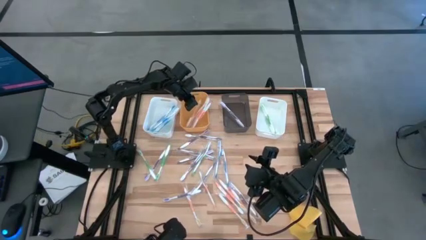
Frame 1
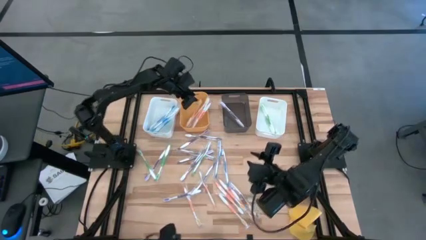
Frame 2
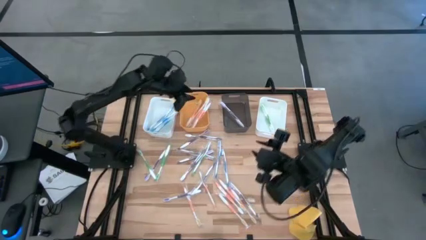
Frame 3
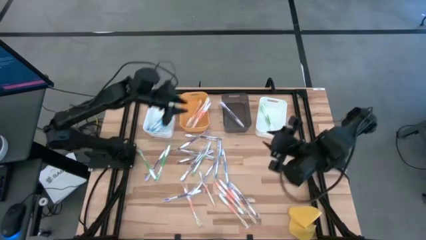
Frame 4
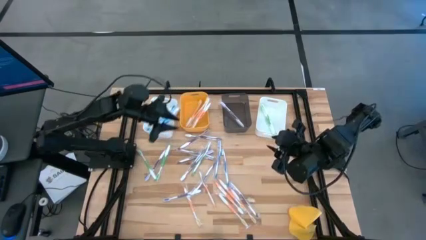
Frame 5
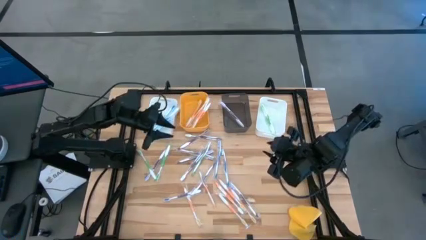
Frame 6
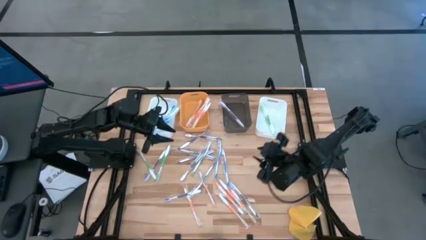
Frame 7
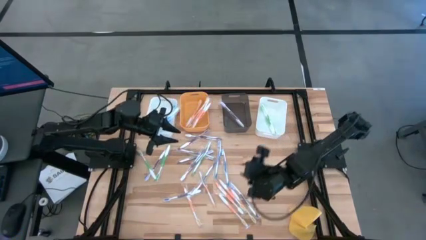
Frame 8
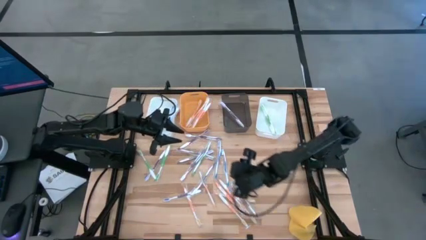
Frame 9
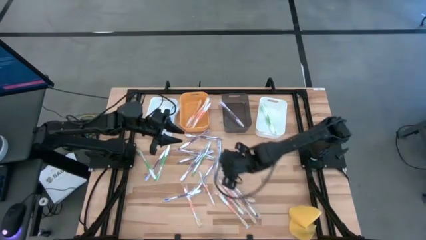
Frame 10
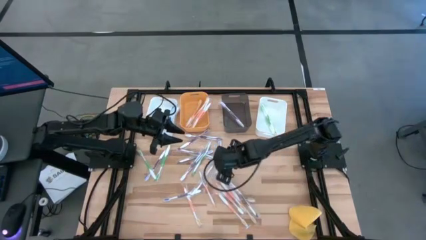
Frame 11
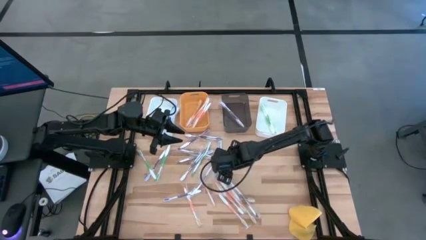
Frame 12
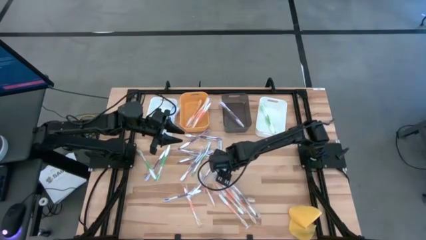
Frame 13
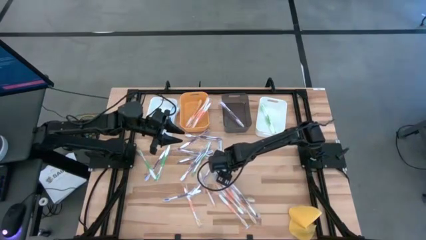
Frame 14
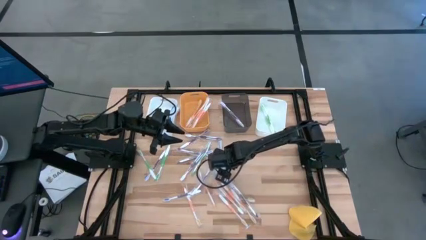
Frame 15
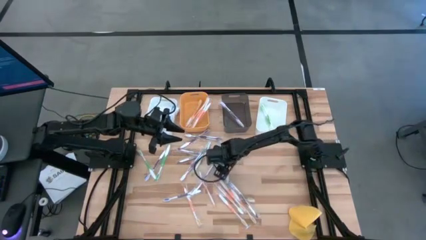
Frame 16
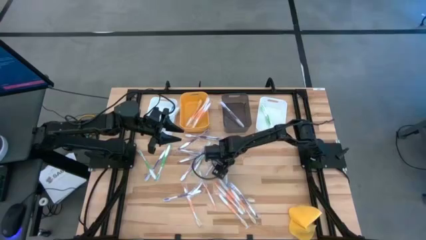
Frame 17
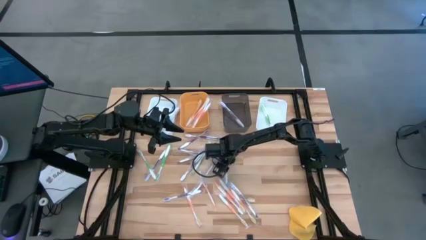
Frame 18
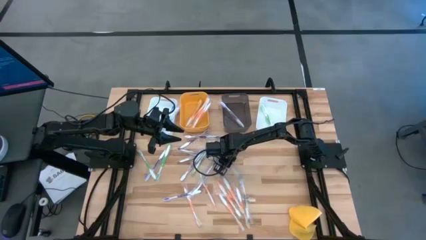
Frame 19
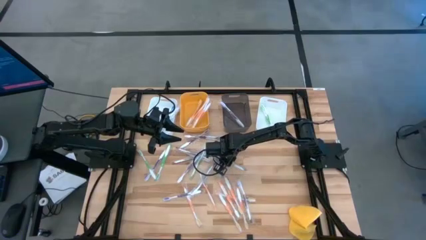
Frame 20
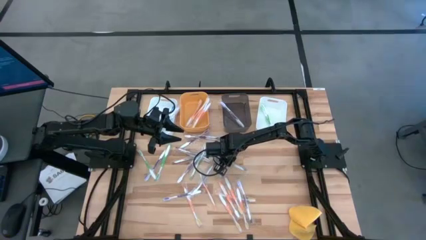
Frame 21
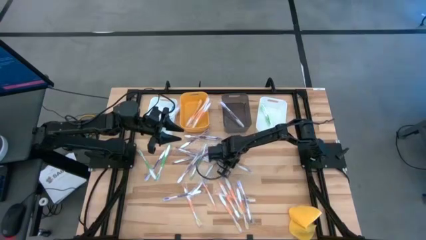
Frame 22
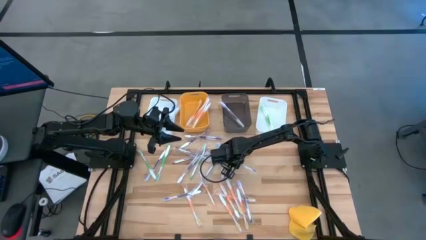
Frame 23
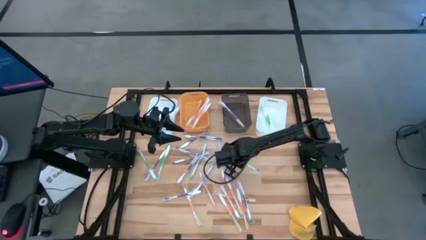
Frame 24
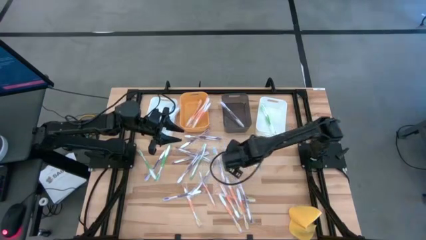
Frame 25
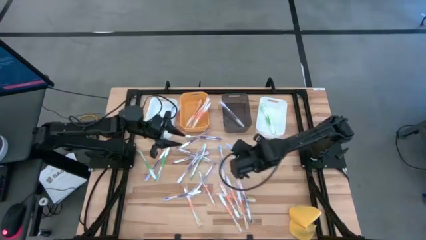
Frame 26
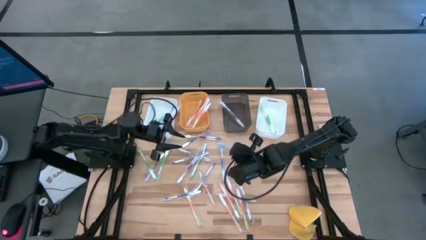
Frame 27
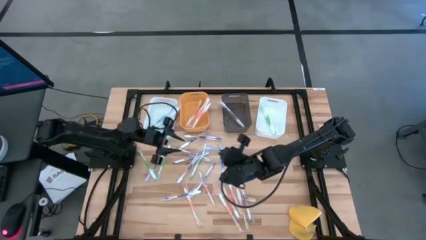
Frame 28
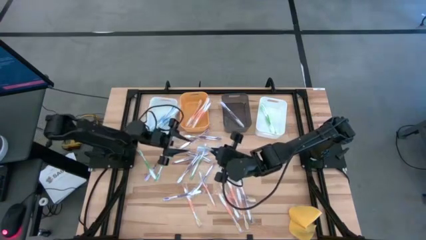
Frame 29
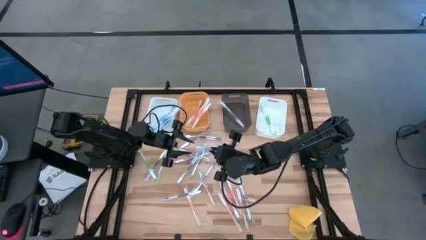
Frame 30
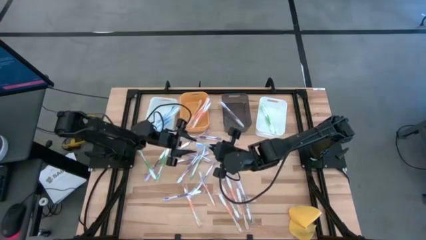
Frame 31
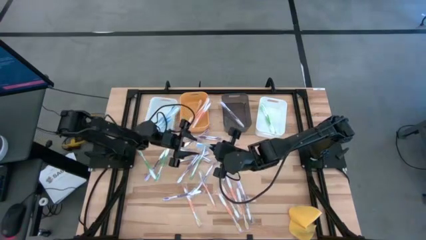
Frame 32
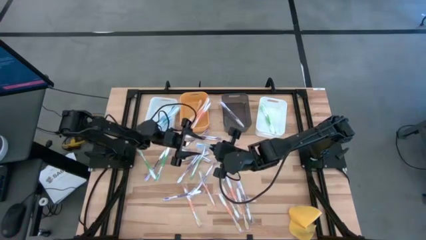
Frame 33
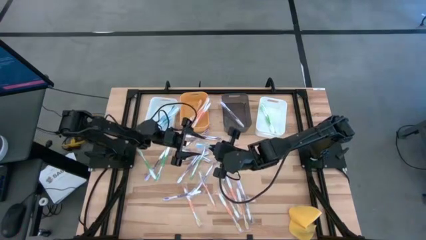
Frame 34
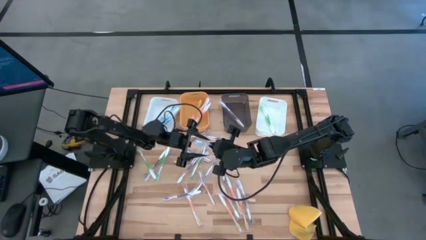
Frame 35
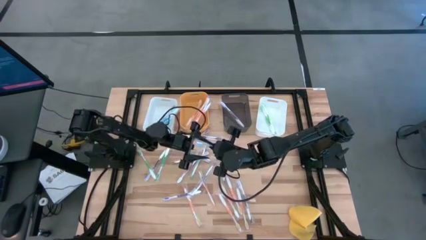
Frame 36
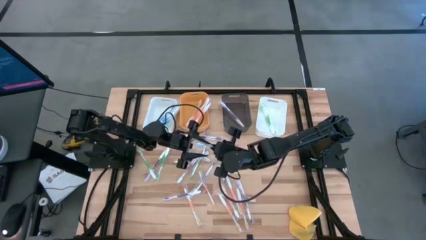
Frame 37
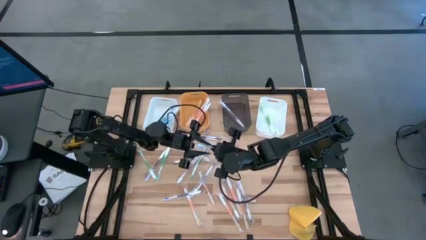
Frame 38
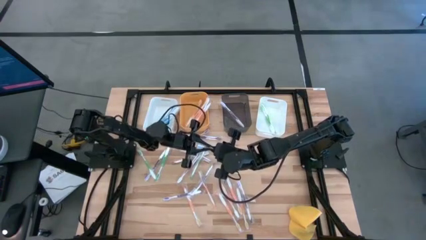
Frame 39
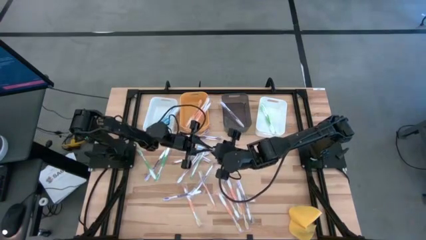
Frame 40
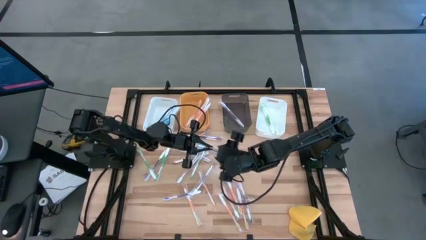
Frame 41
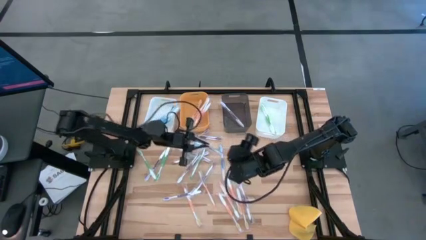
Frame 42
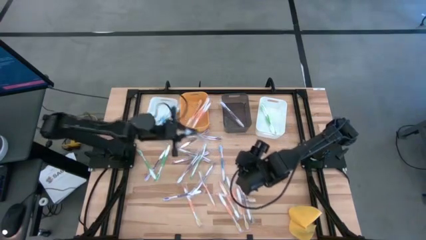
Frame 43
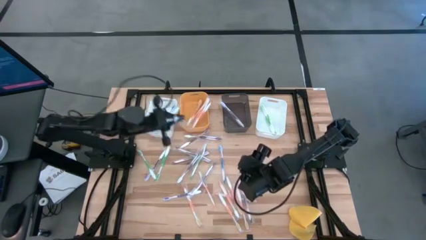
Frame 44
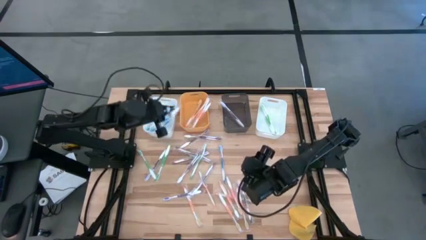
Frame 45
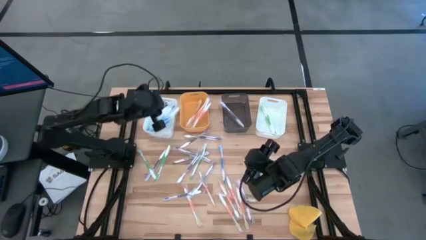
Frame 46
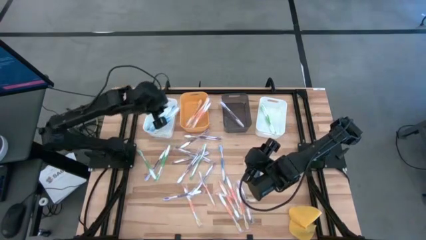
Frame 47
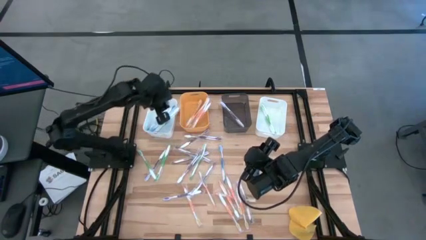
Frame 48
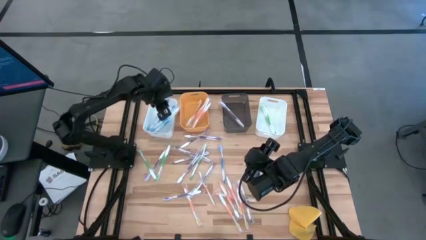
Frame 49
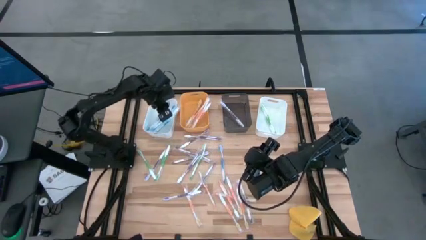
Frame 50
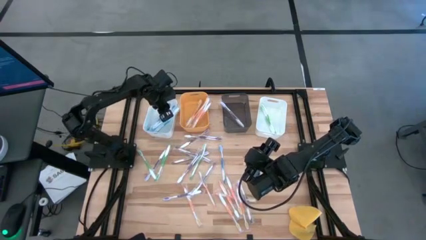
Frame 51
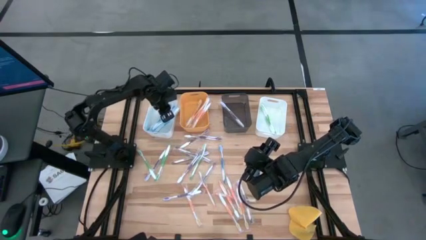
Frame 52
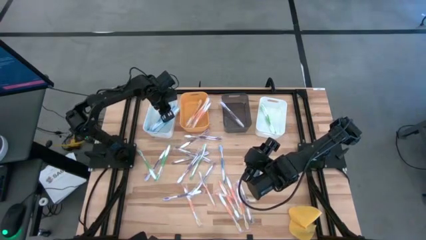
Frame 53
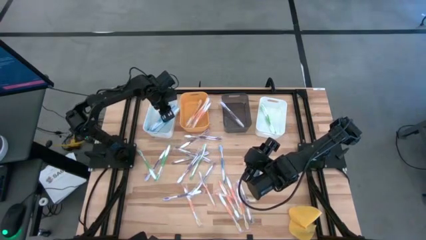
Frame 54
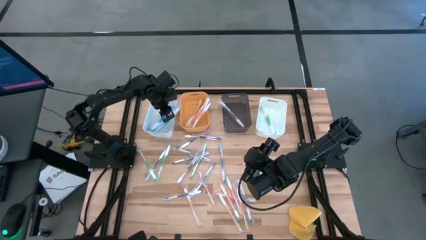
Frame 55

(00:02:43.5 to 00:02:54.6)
Task: Pick & Place Toothbrushes
Put the blue toothbrush into the left white bin

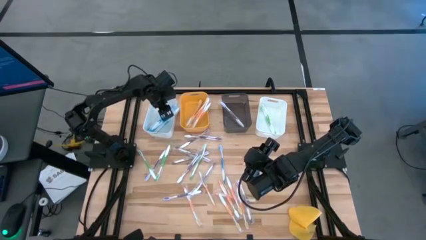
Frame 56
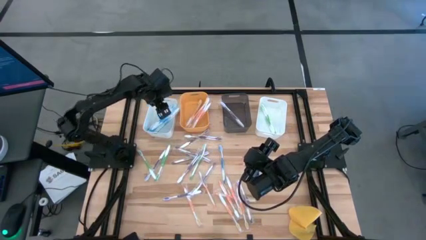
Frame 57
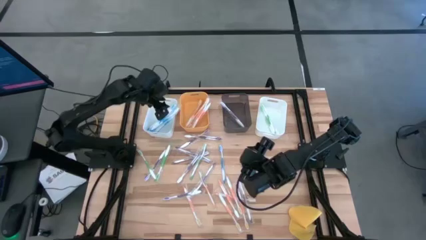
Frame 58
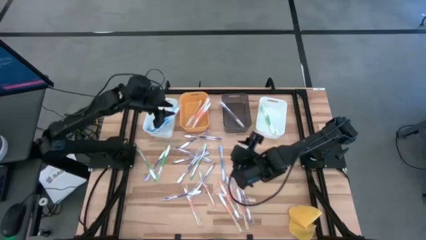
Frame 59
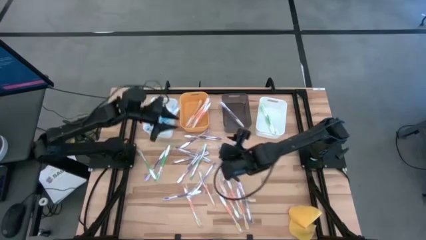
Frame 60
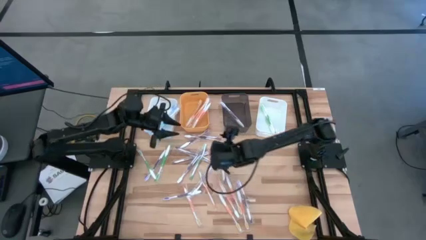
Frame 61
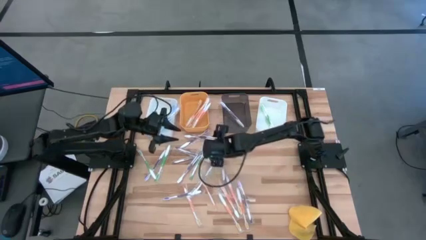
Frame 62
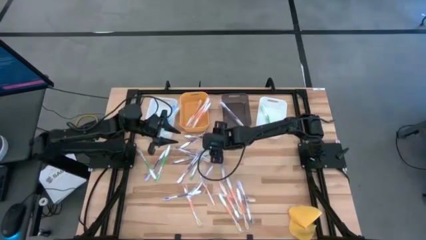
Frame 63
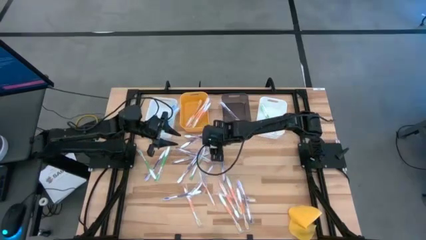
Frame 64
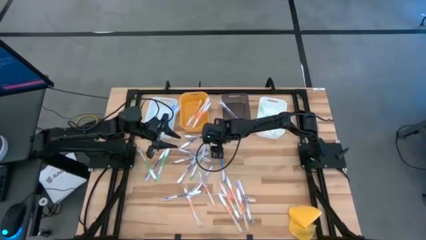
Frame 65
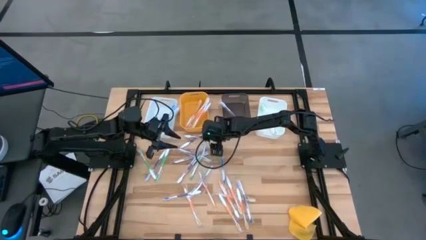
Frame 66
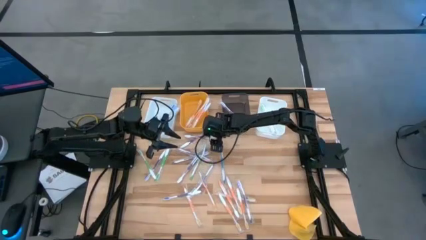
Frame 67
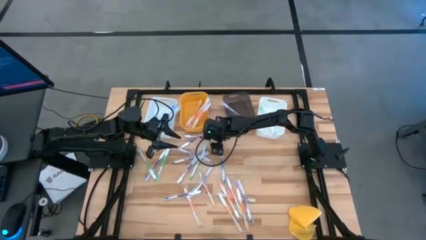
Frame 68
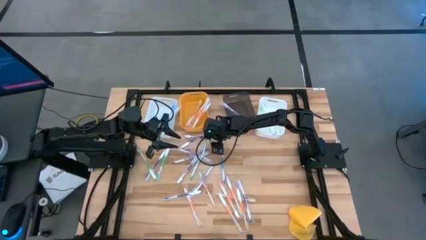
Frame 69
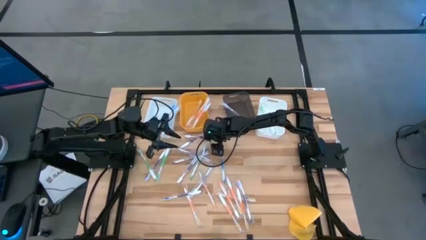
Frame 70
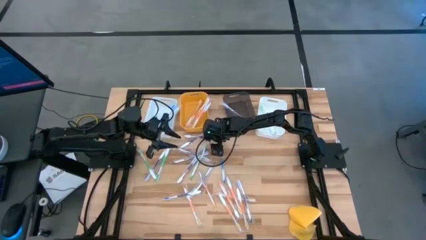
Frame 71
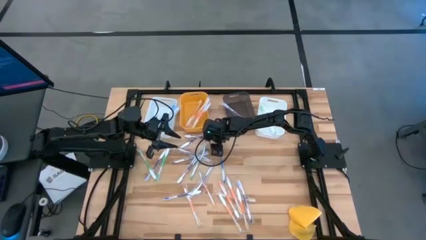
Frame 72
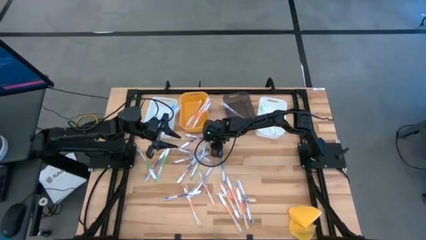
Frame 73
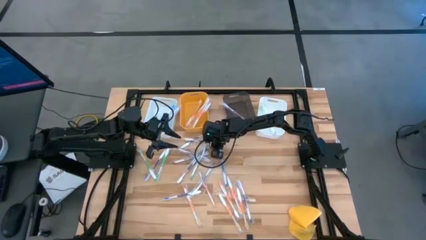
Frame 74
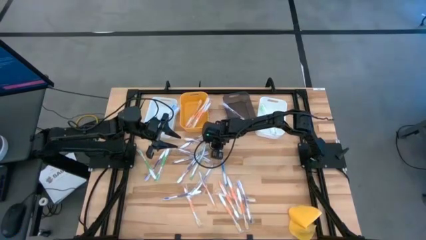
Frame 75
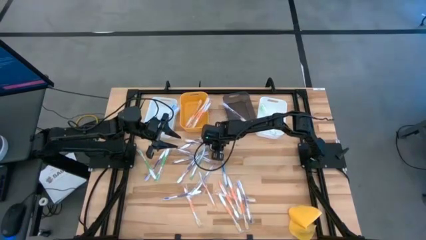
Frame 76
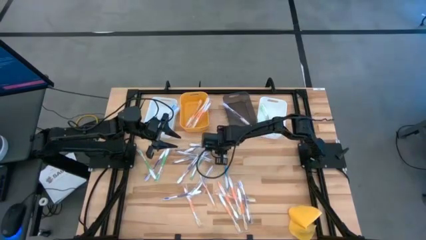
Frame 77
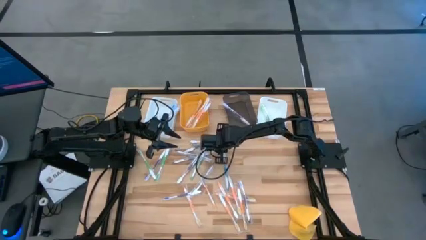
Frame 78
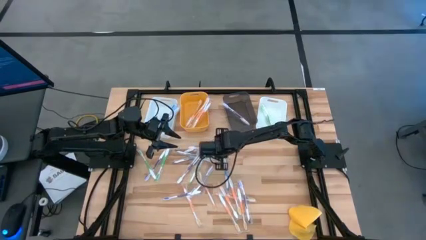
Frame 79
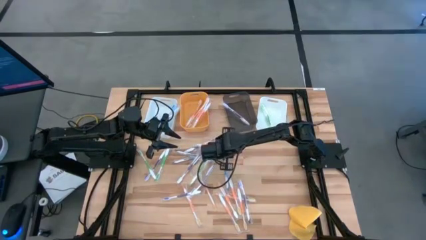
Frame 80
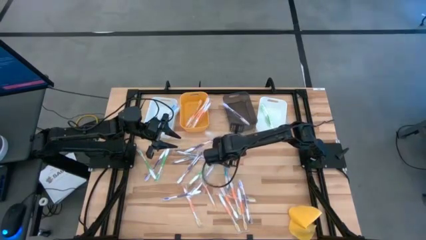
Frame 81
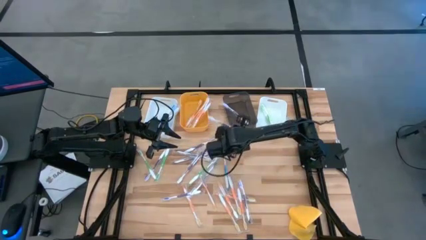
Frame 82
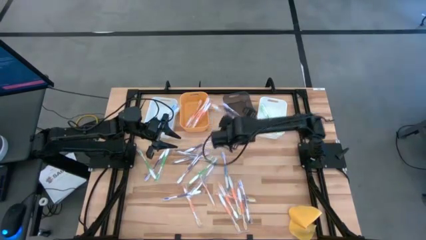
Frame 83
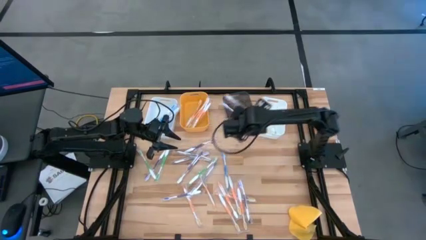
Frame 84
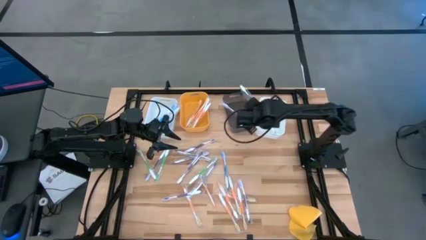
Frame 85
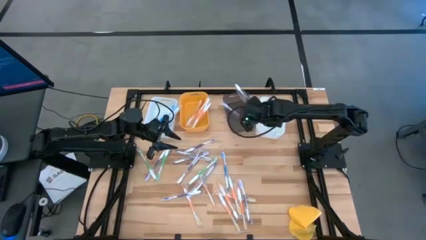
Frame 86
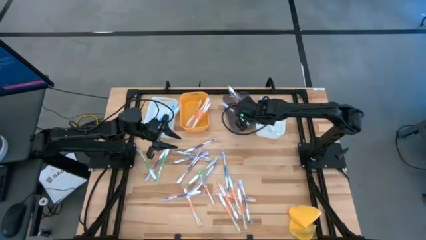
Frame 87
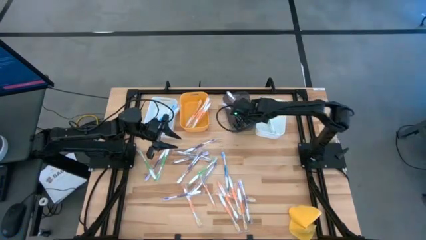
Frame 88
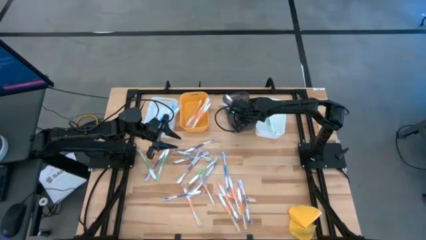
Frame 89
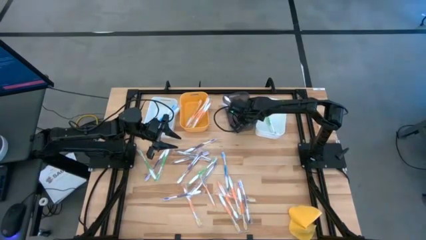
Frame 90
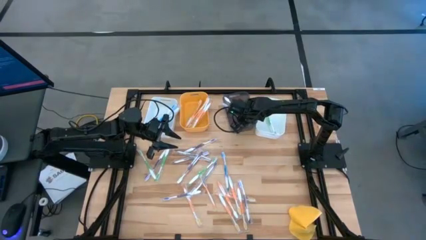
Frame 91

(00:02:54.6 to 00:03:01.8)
Put the violet toothbrush into the gray bin
